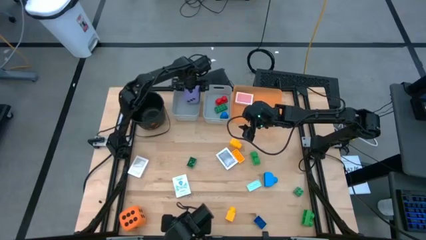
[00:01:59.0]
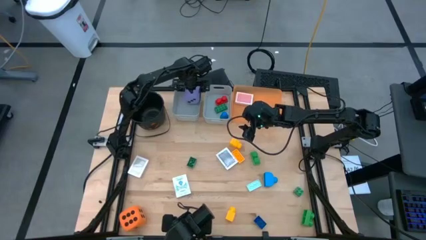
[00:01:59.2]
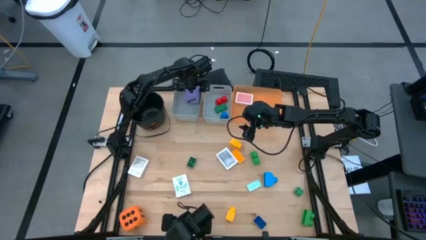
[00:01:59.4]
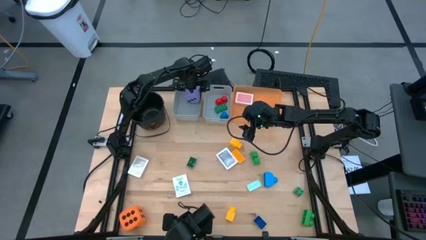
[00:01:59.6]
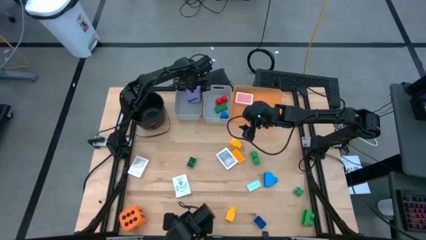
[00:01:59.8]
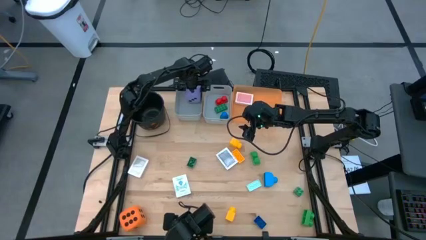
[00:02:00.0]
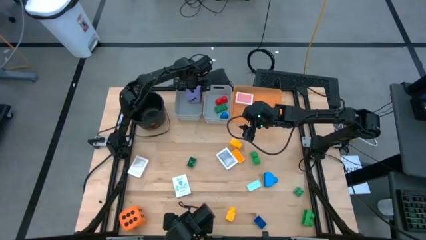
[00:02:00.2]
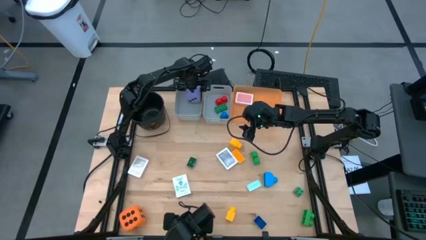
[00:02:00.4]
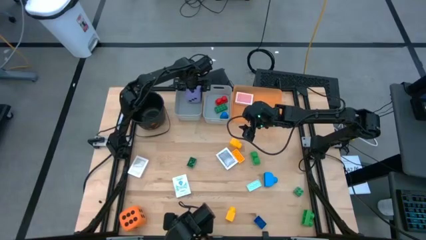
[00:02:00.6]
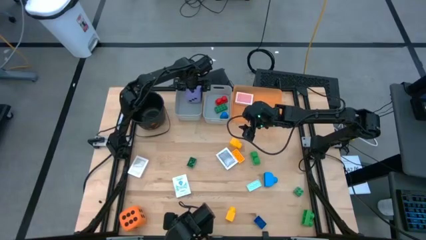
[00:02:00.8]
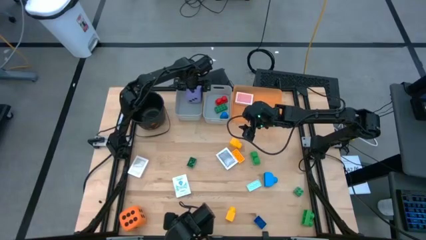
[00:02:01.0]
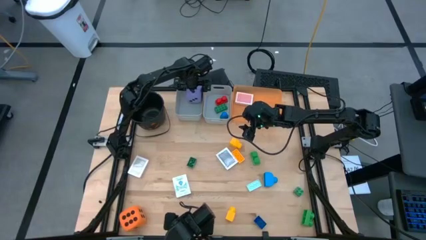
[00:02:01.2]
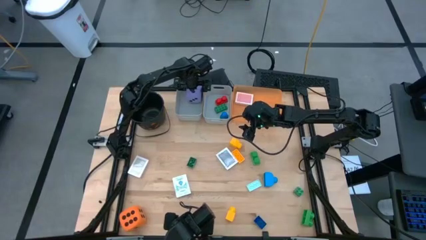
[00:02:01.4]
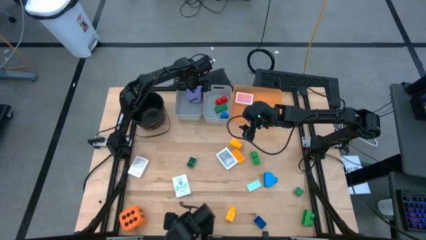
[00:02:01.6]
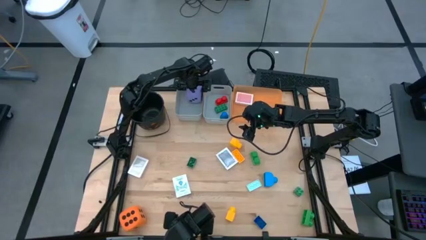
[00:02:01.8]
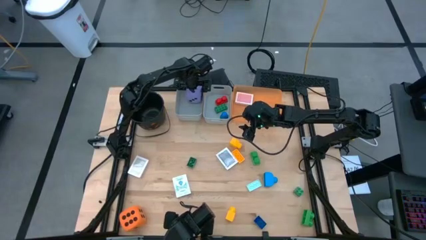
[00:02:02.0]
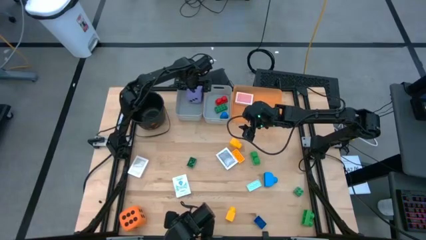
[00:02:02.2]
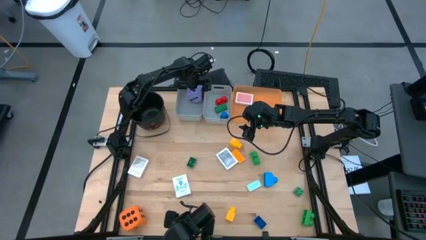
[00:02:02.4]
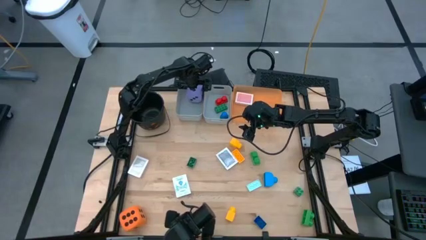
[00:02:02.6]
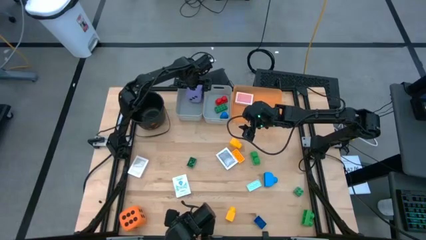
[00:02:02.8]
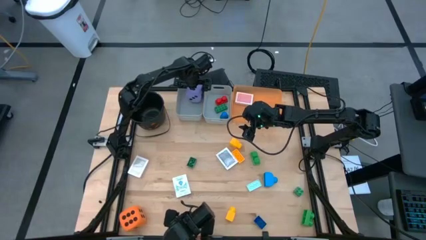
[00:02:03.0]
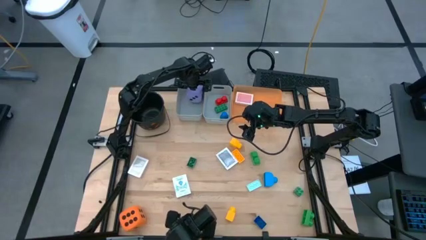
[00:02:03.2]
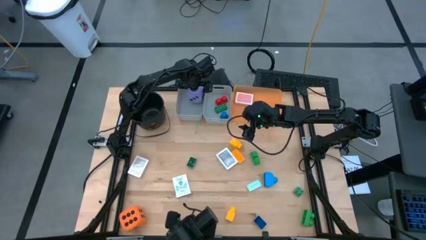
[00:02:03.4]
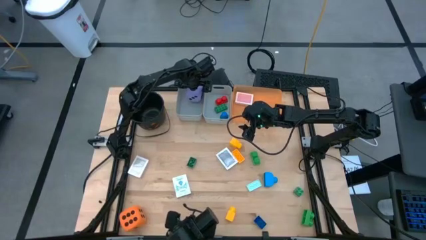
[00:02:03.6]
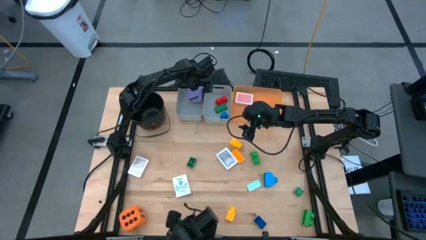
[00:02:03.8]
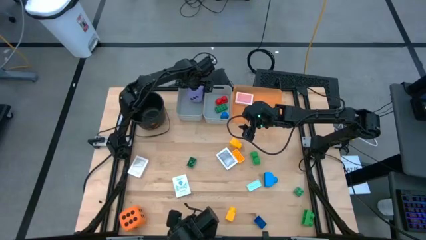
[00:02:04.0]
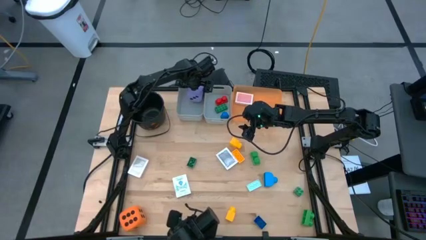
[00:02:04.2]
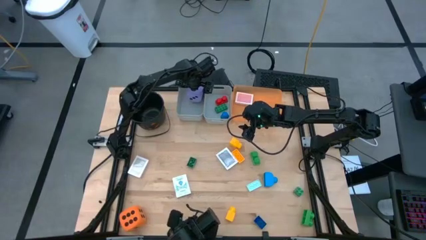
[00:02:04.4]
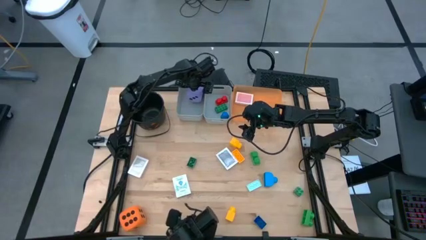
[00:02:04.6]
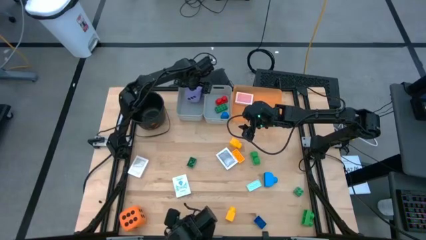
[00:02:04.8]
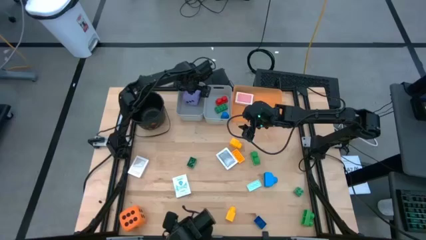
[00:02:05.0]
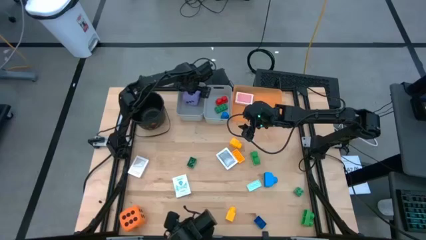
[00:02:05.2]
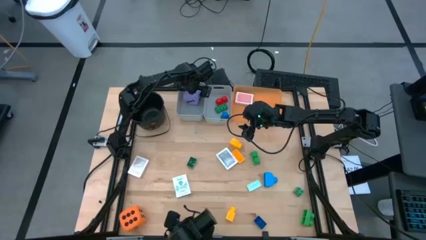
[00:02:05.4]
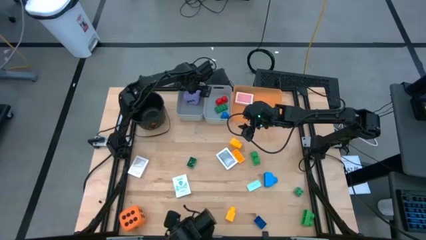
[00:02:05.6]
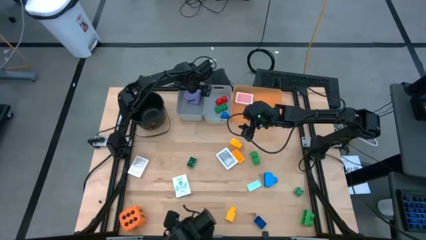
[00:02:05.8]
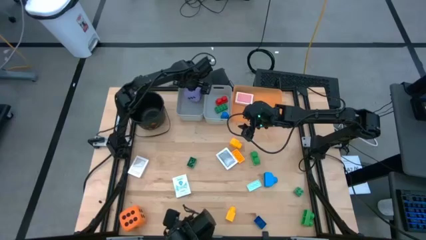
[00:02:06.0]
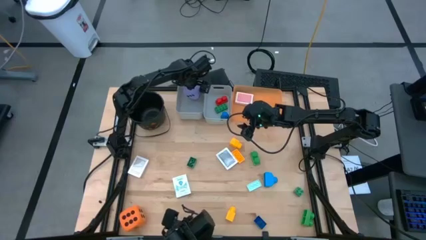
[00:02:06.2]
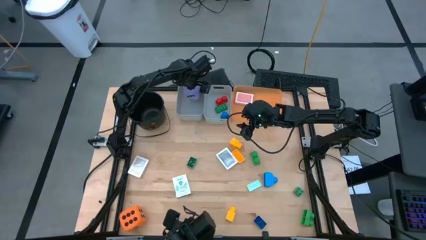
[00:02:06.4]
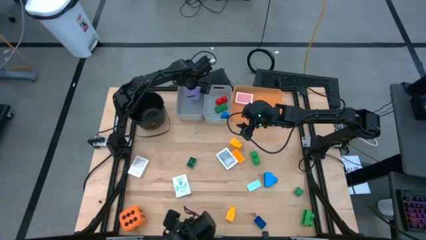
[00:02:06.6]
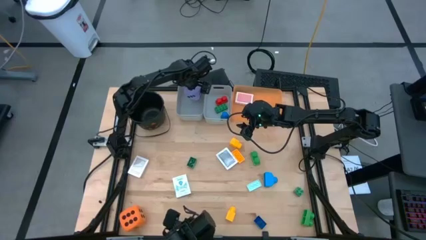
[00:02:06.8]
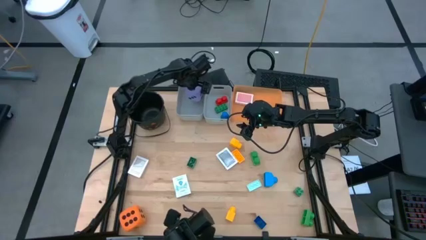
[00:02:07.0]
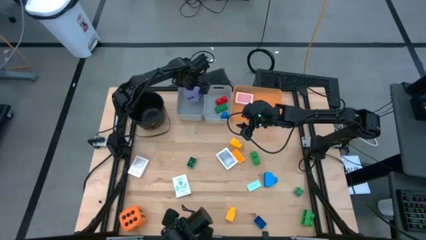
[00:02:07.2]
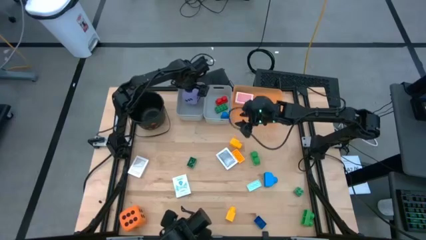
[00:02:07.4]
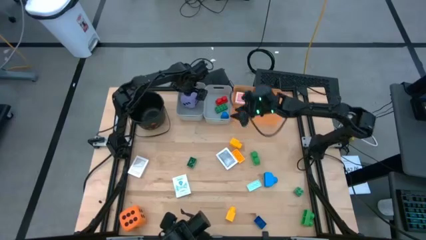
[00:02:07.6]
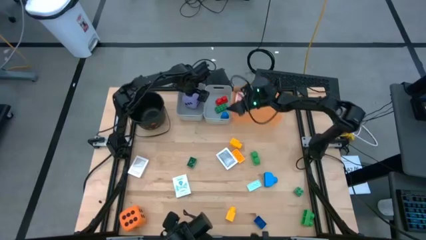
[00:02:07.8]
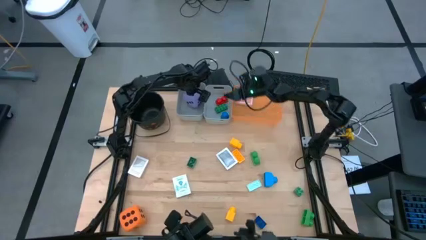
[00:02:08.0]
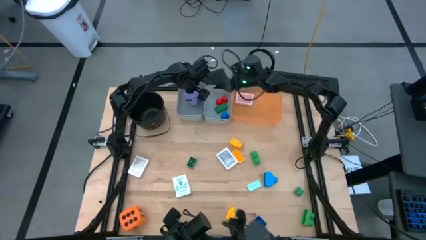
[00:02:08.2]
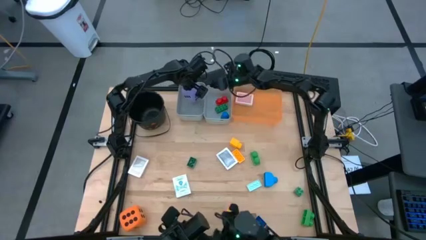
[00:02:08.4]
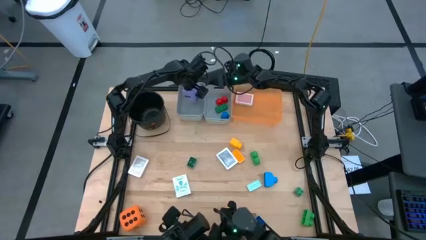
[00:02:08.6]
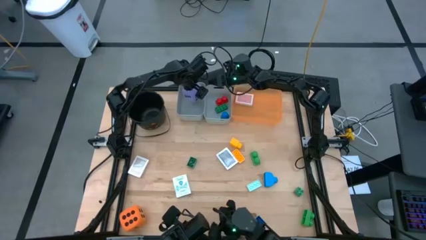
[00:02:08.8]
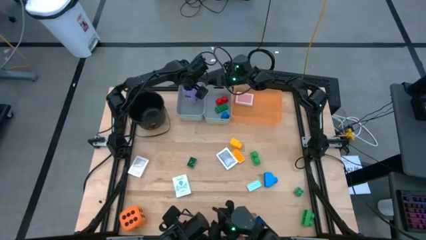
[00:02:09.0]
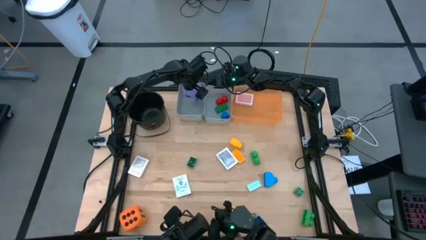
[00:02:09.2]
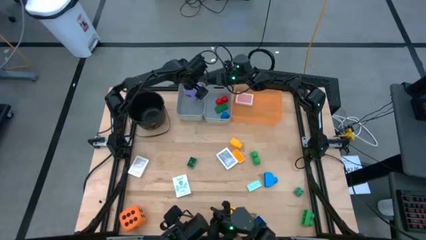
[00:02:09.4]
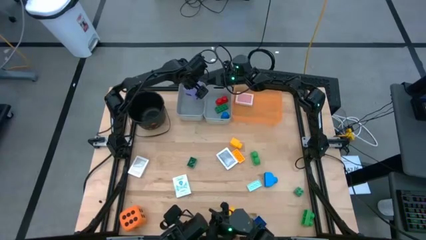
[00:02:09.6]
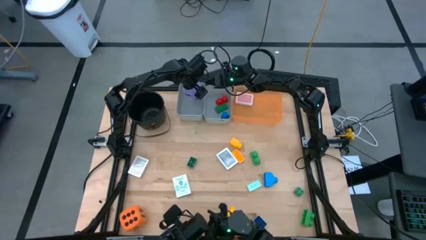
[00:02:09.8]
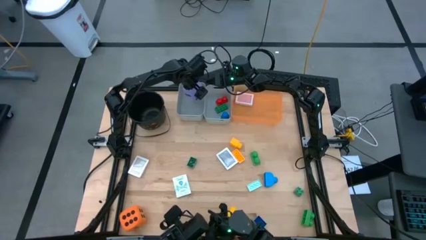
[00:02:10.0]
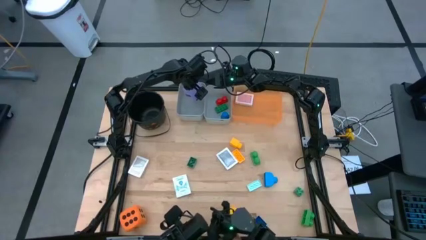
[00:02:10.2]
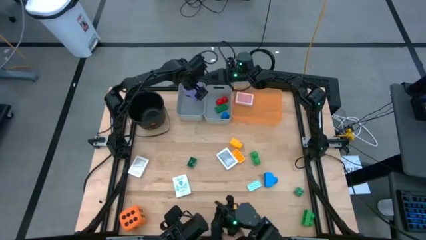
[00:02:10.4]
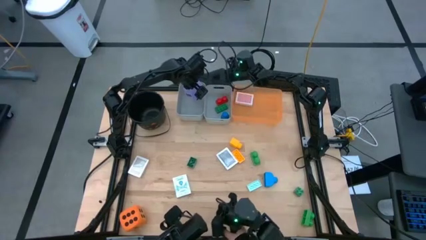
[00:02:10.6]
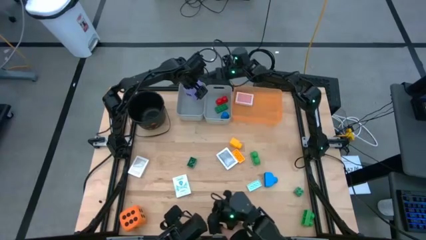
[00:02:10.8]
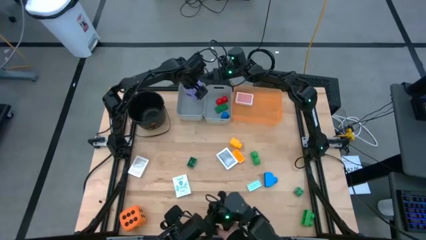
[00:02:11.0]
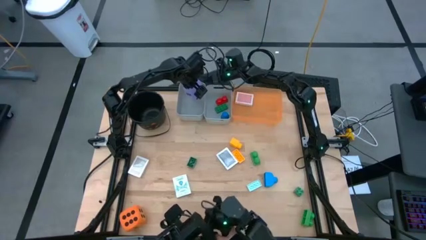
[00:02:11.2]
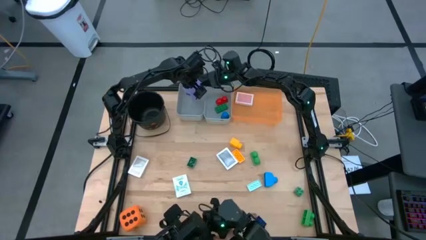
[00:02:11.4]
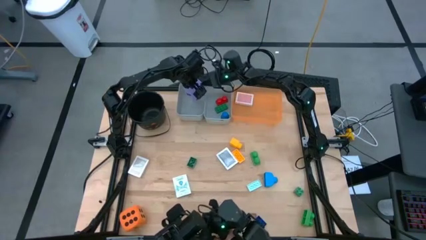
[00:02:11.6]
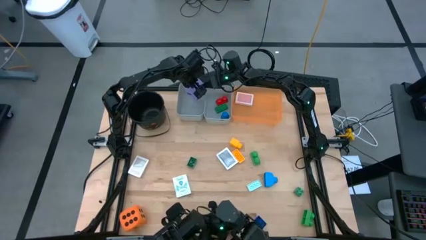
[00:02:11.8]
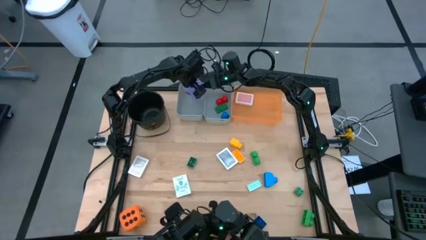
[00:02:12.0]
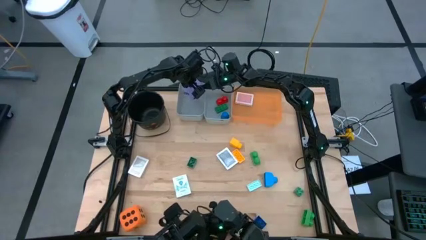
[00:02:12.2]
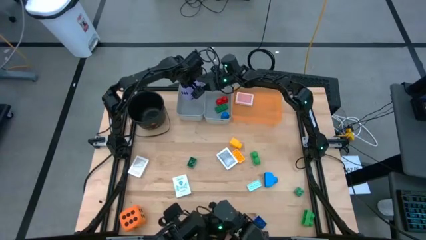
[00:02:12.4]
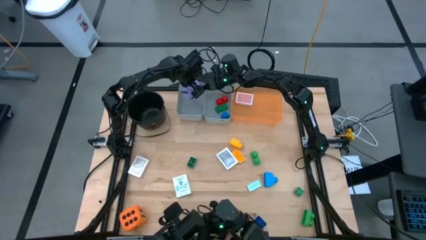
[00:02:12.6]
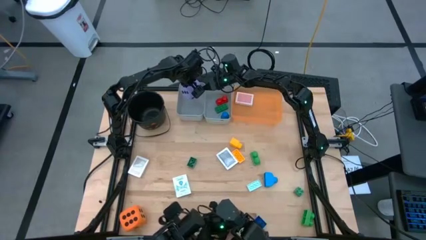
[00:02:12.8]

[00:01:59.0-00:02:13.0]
Task: Pick & Place Toys
Put the purple dice into the left gray bin
